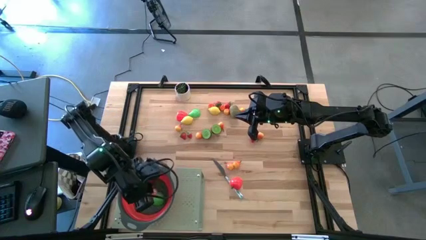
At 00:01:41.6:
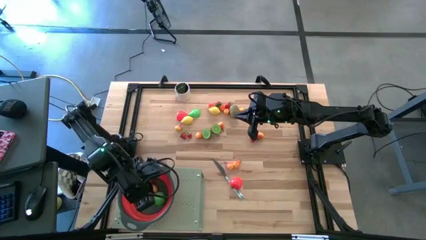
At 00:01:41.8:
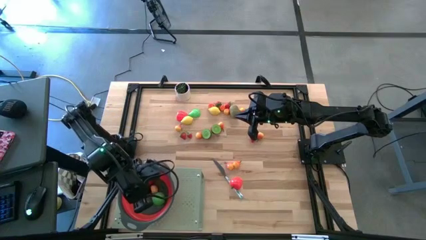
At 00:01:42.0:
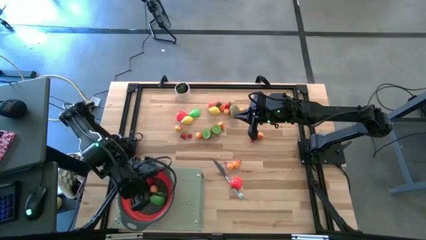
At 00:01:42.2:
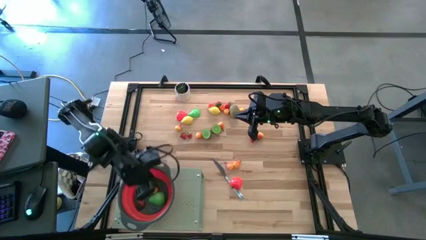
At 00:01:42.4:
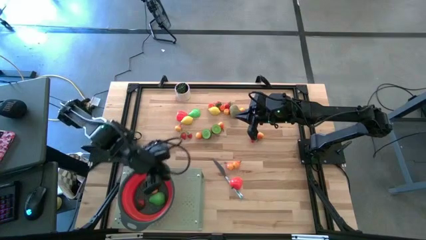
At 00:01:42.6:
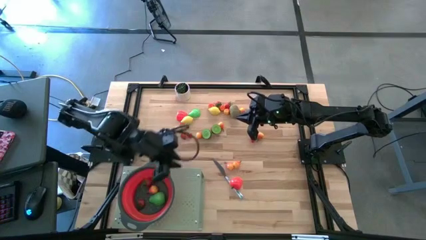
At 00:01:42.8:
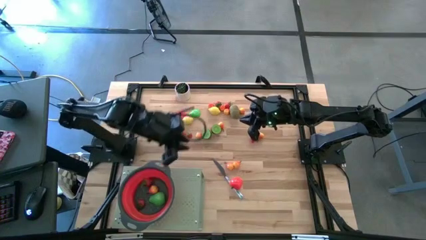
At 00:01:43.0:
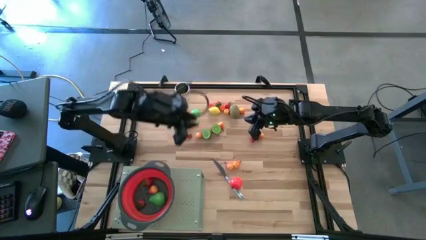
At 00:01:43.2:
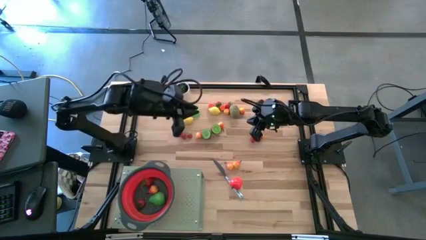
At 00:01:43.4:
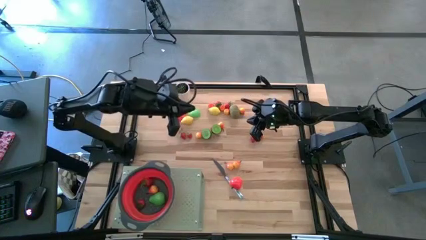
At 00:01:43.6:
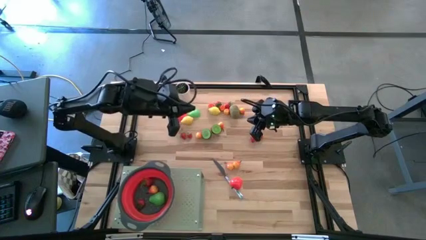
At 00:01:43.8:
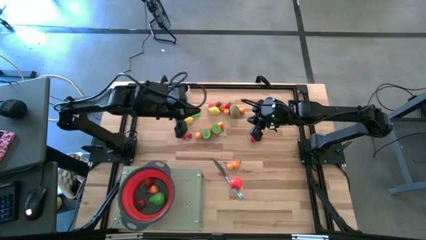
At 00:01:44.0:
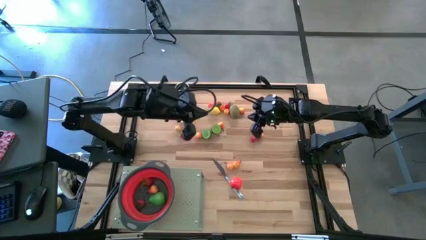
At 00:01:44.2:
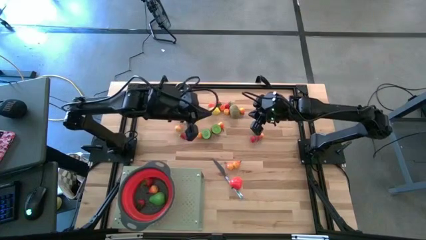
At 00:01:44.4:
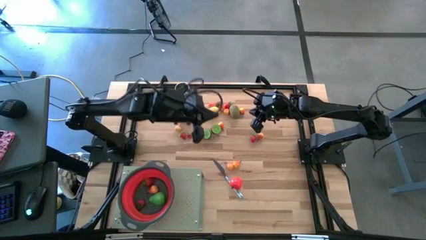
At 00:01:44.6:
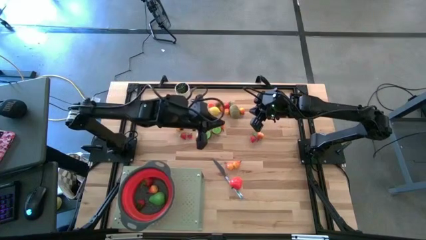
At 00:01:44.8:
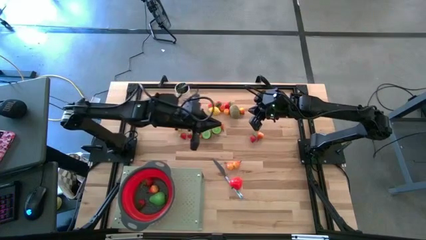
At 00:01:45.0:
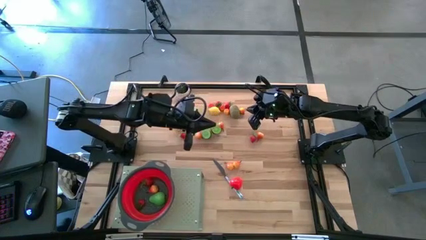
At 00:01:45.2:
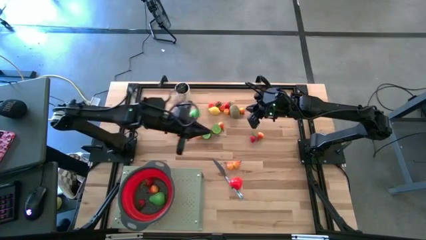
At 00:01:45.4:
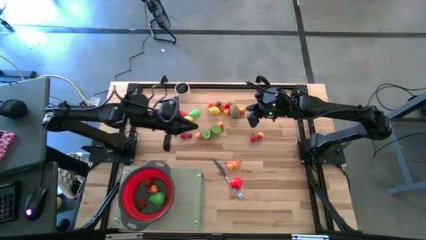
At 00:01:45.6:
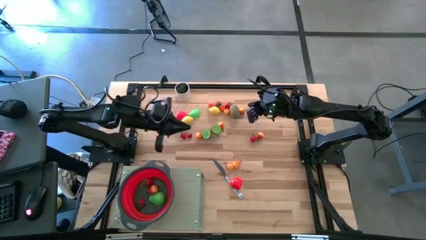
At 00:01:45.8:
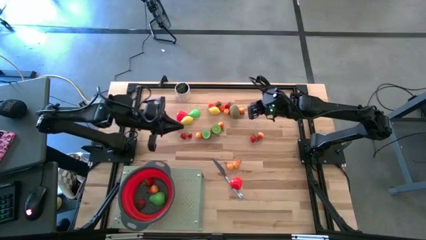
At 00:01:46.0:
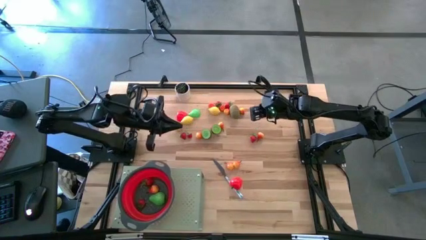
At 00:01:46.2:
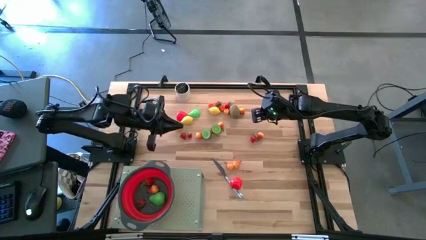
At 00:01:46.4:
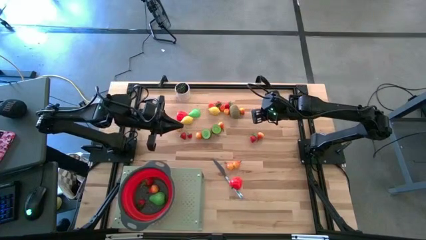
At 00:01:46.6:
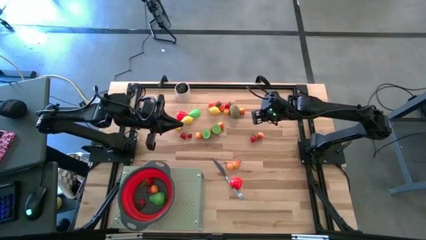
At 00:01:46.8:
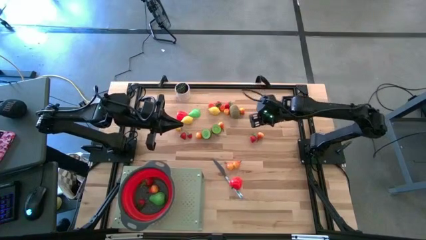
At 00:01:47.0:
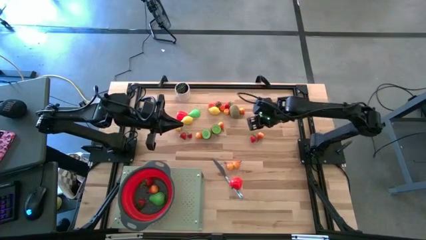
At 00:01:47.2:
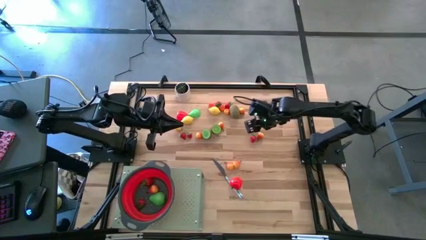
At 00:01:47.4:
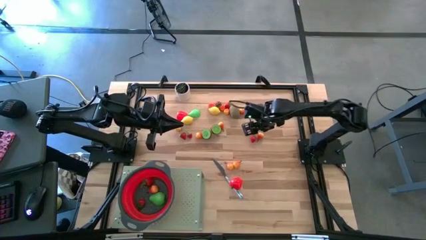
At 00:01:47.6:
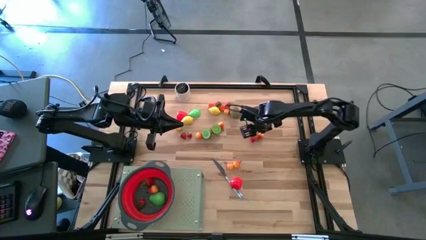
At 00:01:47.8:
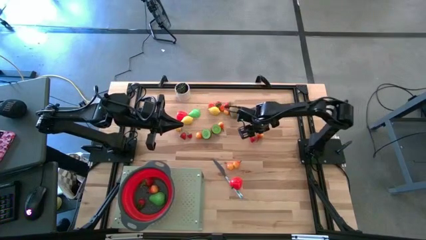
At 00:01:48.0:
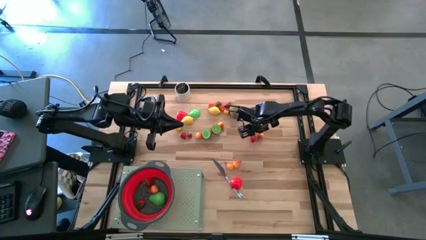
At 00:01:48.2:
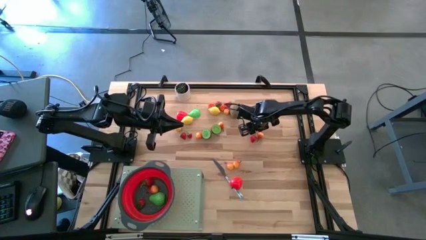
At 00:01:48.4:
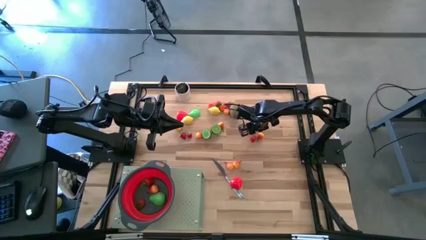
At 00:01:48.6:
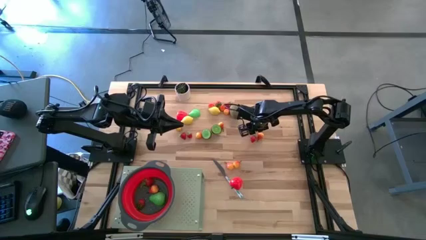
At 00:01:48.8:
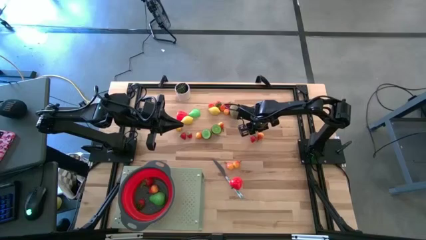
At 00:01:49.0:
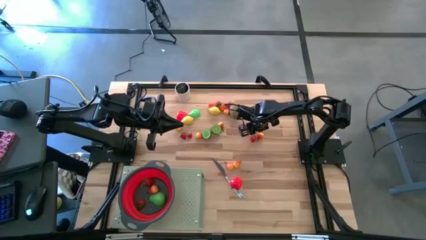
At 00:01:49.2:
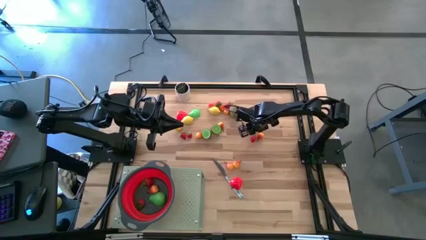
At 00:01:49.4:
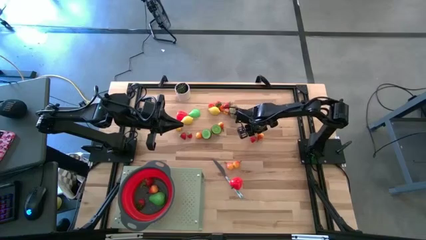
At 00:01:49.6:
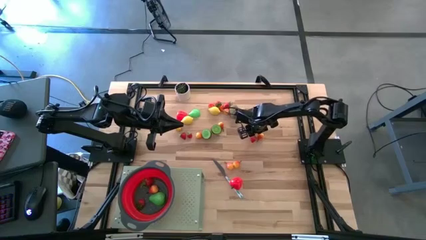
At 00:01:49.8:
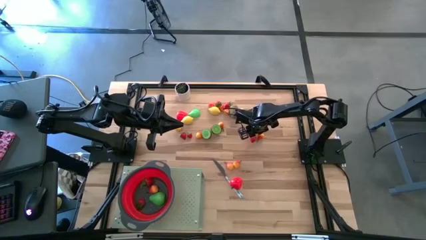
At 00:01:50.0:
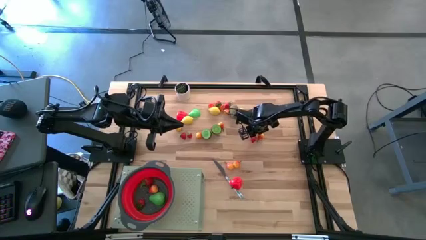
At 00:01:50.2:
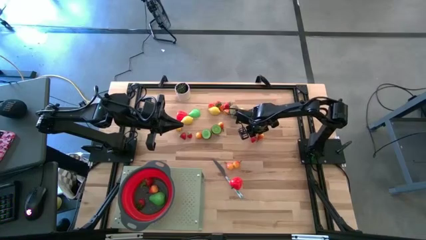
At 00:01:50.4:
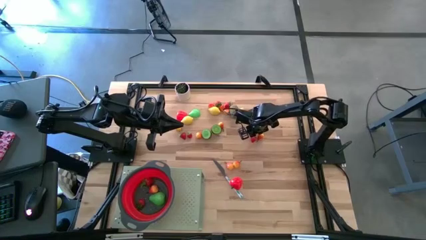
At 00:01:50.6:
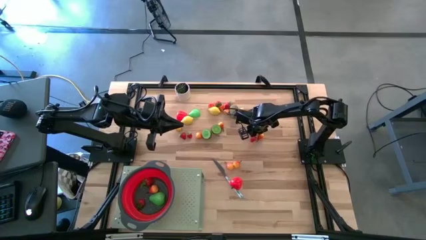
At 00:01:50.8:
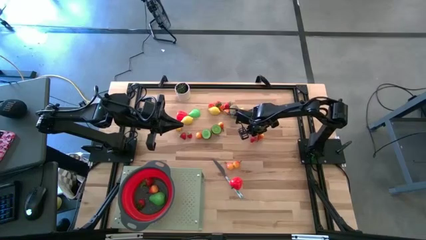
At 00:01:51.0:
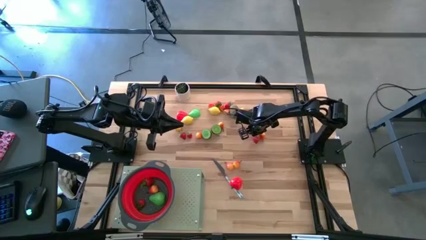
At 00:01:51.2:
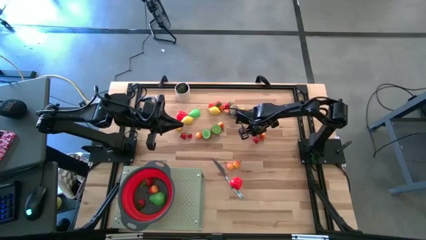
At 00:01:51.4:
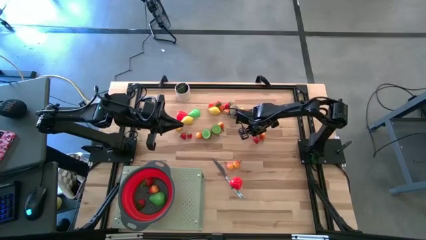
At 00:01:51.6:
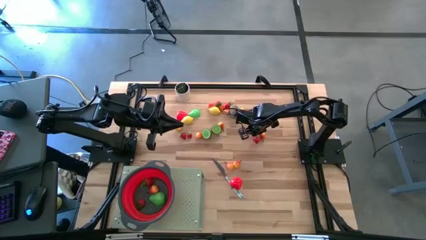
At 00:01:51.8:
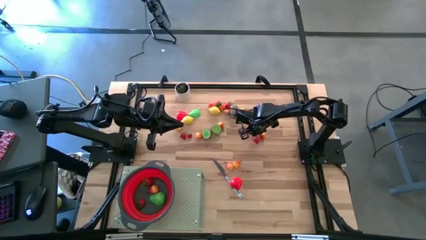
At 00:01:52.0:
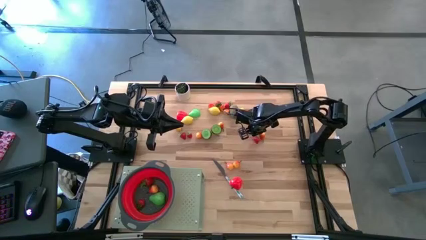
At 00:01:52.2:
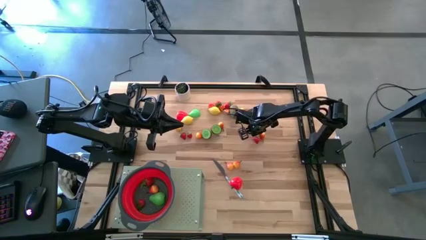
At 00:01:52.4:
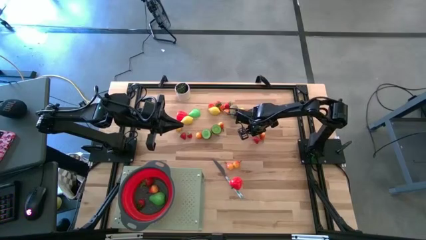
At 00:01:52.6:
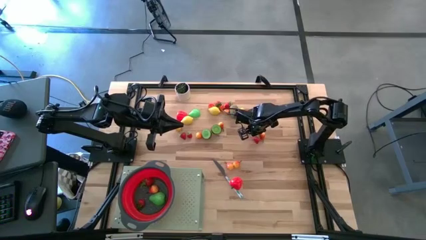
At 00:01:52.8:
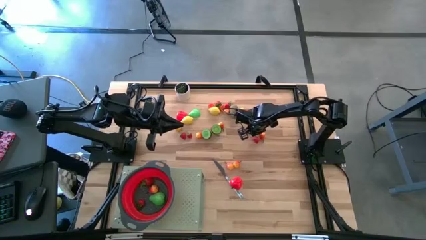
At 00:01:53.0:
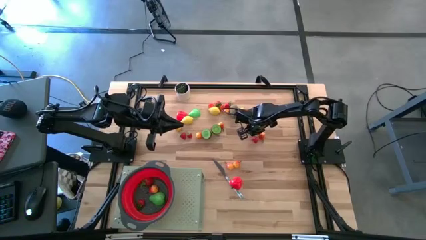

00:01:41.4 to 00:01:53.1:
Task: Pick & Place Fruit
Put the strawberry into the red strainer bowl on the shelf

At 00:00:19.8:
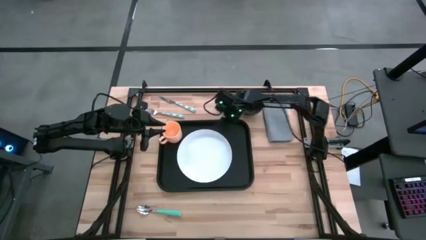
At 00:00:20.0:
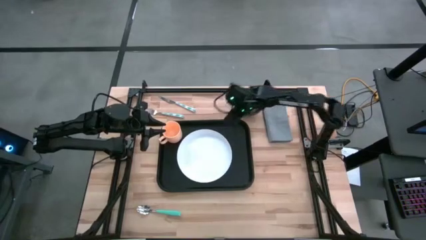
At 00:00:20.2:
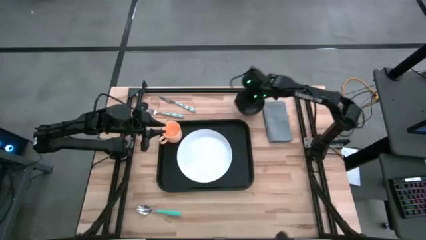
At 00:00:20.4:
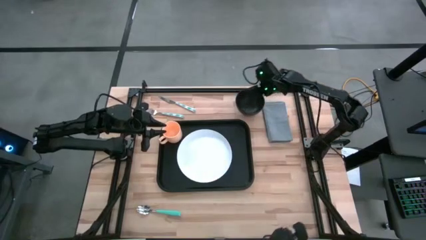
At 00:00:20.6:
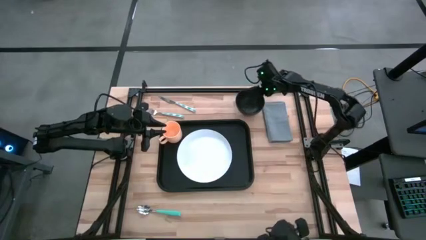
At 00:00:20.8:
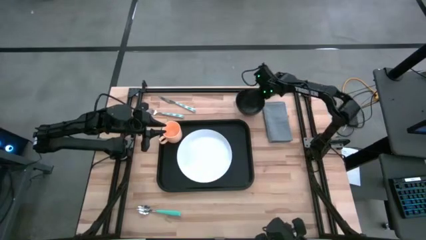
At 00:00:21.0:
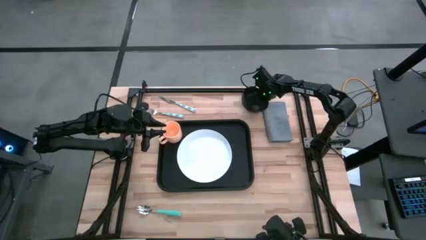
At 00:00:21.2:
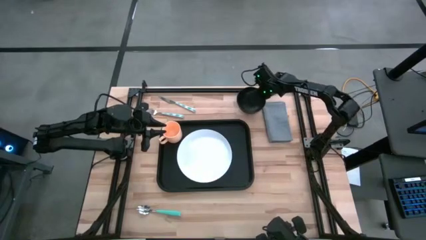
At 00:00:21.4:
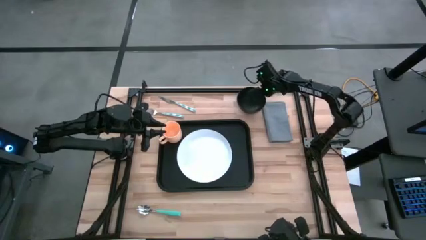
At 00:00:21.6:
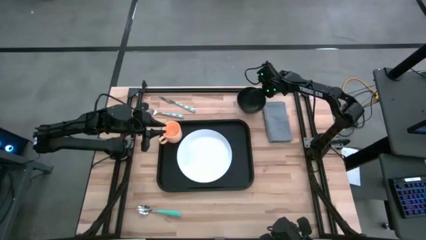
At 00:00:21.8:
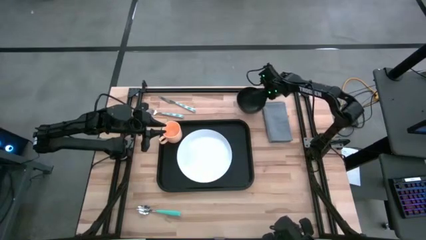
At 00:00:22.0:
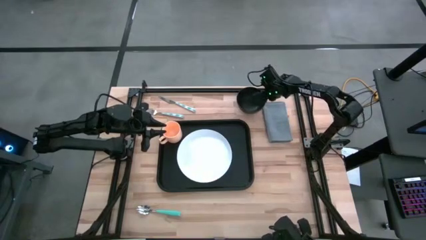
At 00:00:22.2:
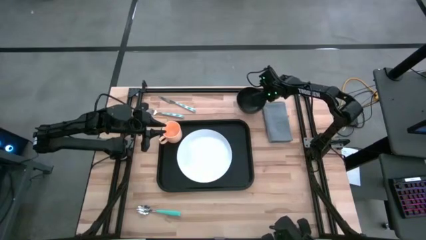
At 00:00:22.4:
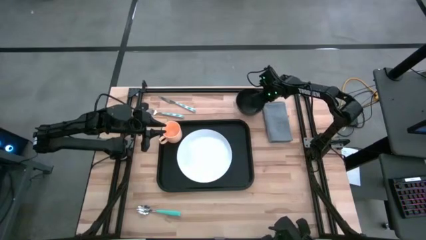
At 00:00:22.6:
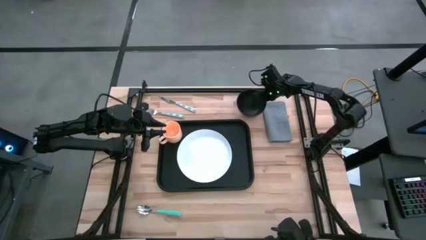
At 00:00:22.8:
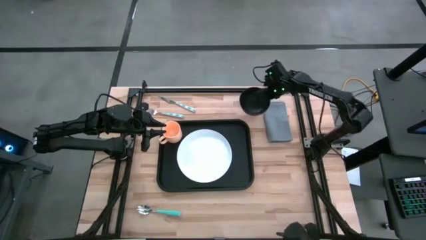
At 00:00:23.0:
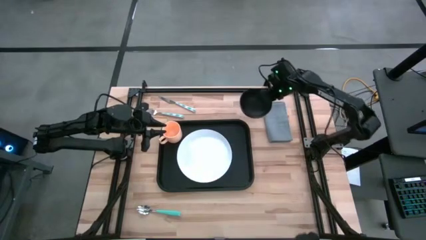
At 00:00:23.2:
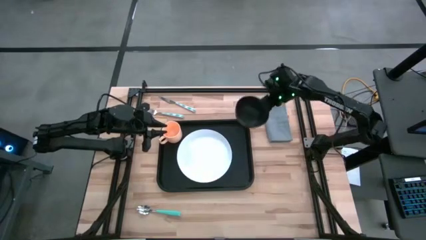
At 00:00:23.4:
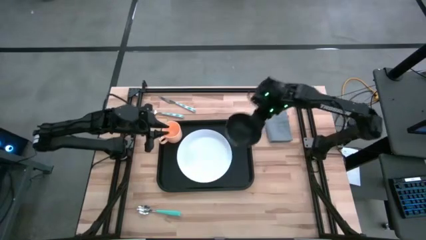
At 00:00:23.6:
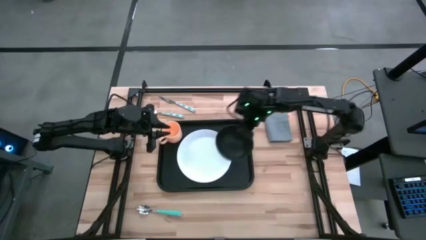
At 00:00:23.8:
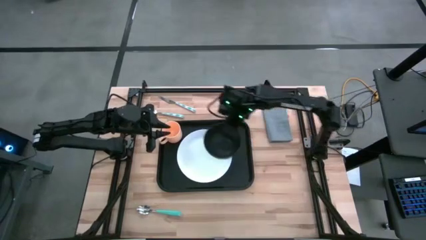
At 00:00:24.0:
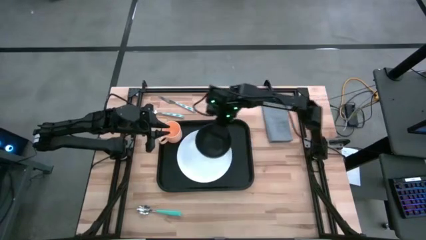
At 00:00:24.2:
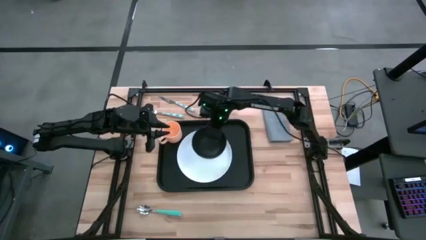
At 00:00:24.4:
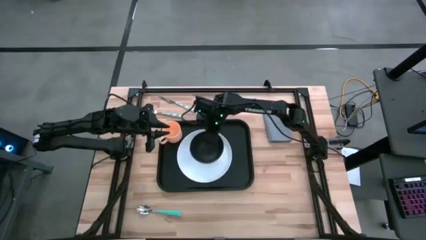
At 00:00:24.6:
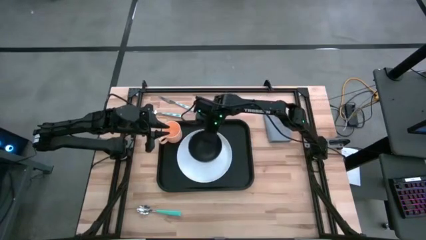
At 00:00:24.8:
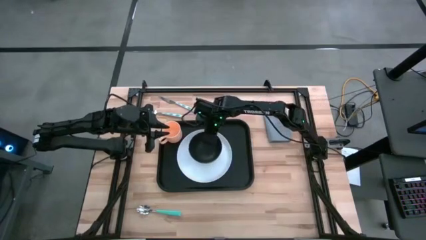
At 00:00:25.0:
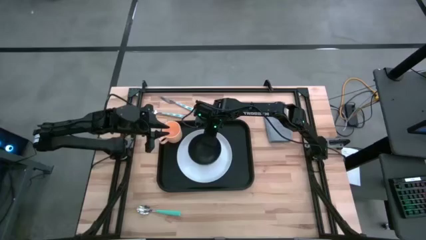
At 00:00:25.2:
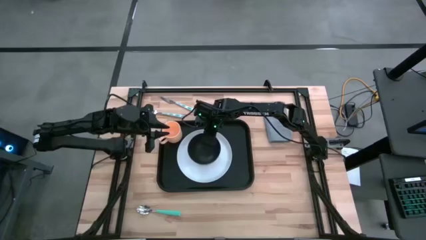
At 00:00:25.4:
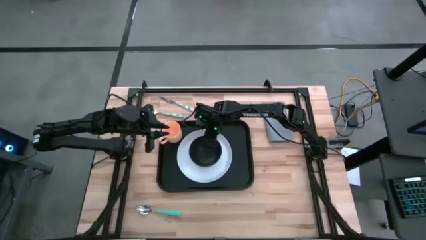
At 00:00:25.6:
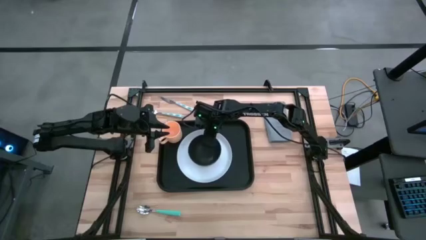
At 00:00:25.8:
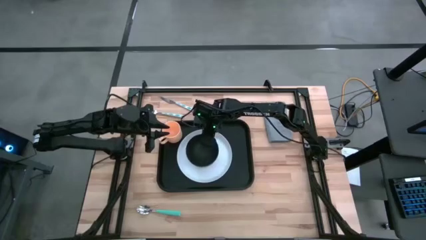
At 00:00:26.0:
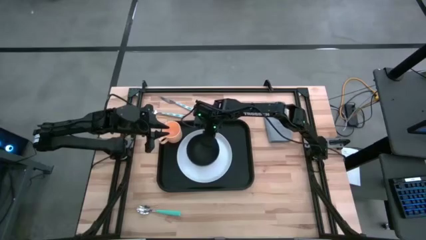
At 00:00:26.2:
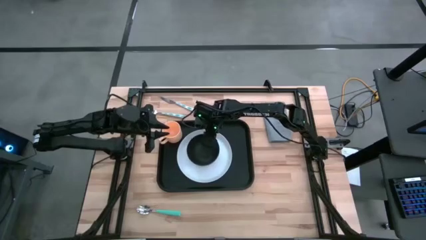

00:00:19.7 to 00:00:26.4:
Task: Set up tray
Put the black bowl on the white plate
